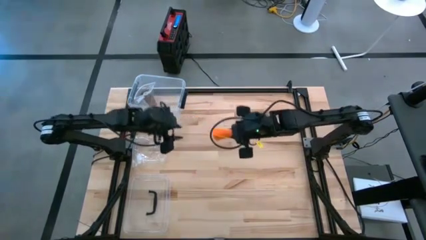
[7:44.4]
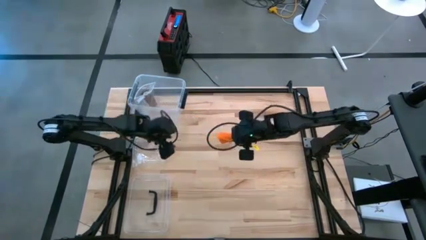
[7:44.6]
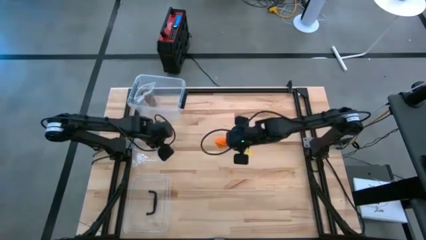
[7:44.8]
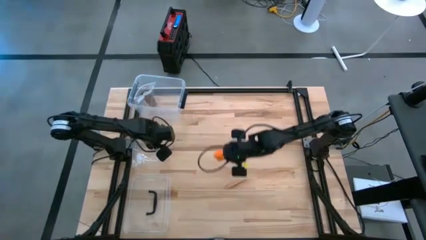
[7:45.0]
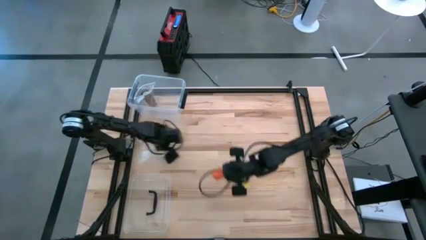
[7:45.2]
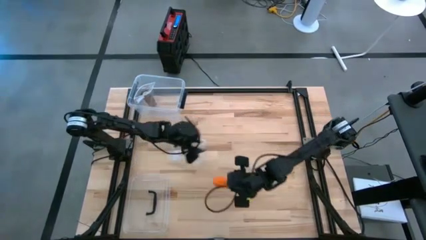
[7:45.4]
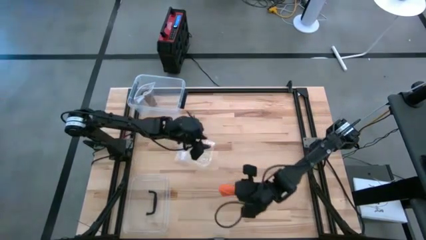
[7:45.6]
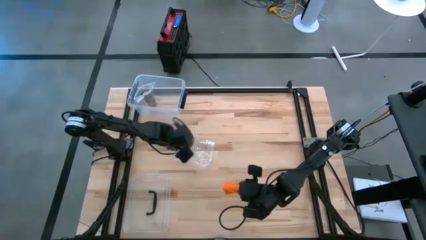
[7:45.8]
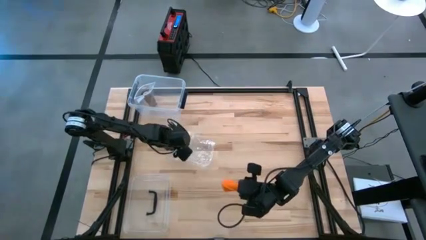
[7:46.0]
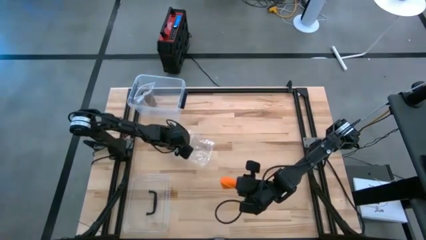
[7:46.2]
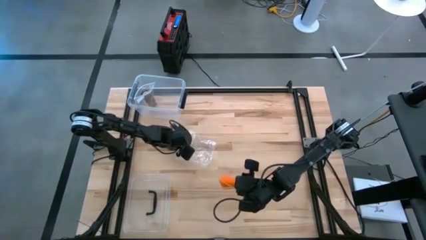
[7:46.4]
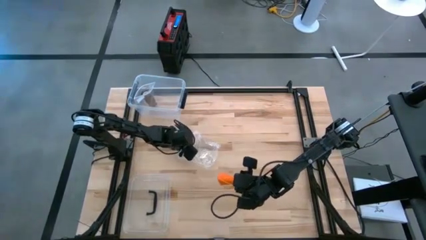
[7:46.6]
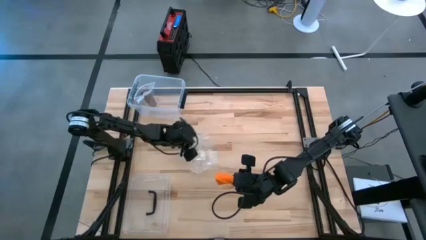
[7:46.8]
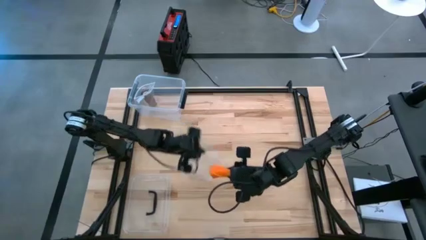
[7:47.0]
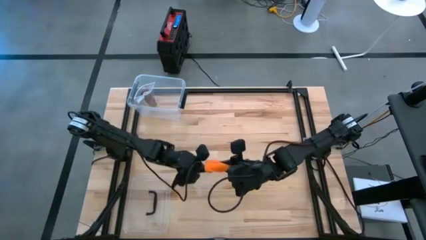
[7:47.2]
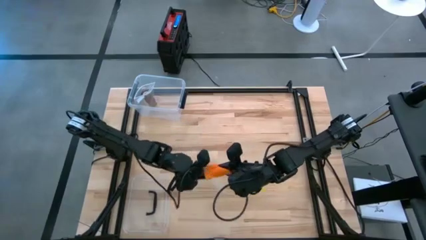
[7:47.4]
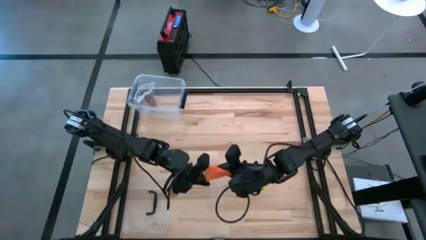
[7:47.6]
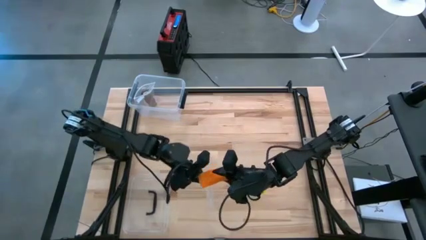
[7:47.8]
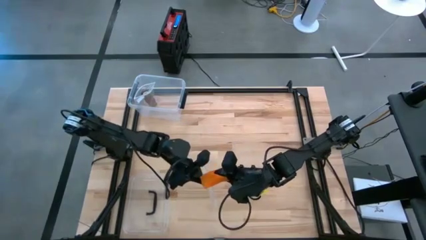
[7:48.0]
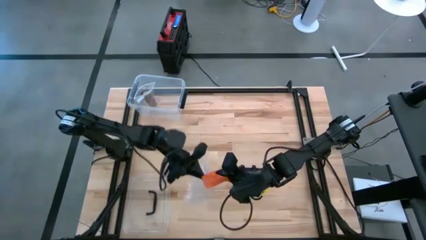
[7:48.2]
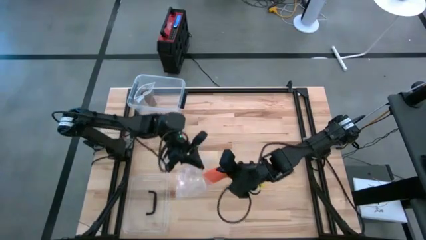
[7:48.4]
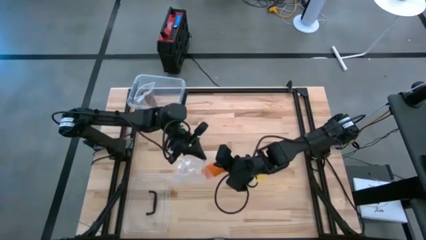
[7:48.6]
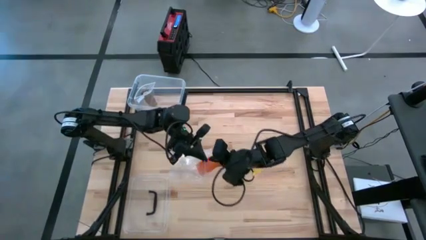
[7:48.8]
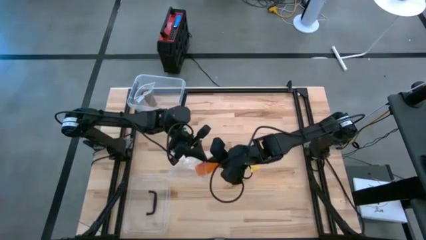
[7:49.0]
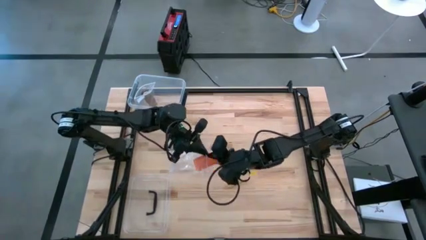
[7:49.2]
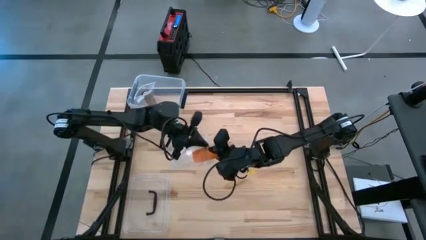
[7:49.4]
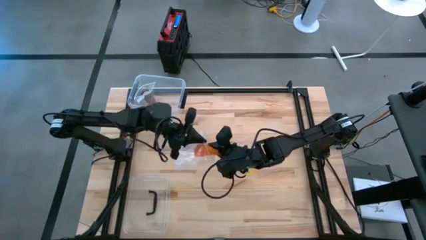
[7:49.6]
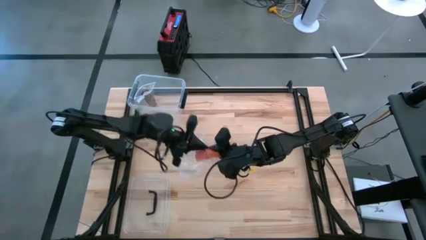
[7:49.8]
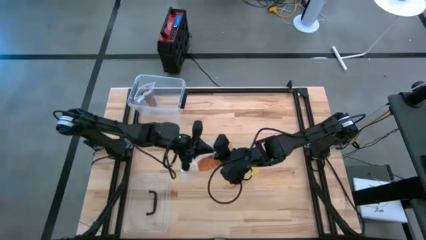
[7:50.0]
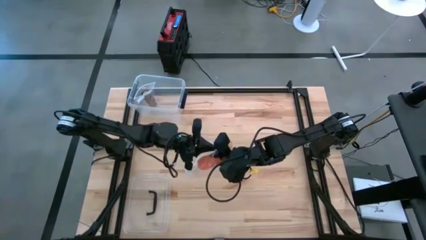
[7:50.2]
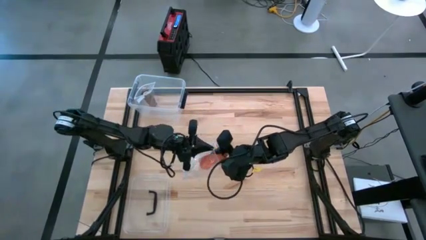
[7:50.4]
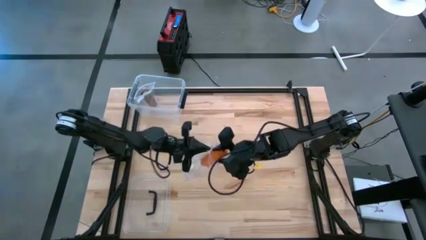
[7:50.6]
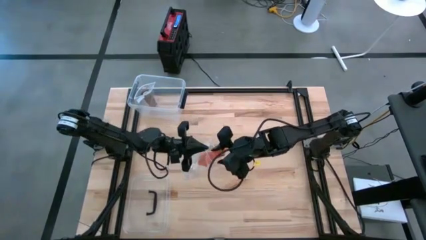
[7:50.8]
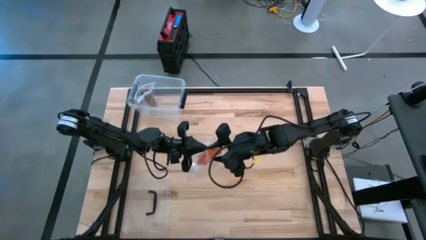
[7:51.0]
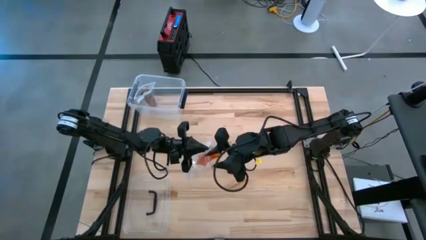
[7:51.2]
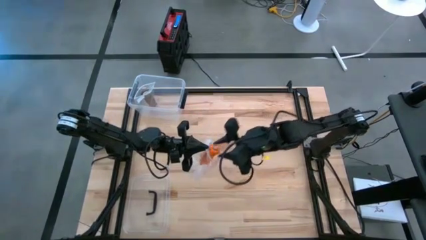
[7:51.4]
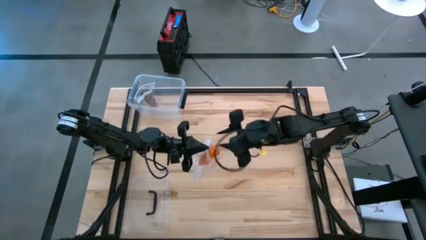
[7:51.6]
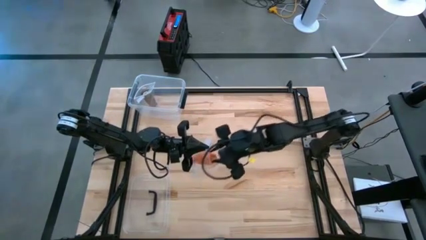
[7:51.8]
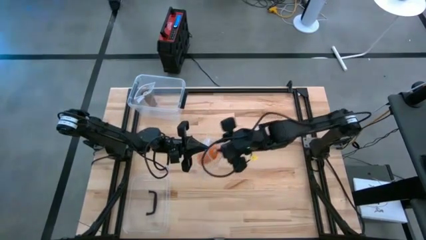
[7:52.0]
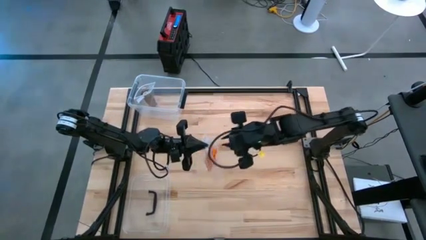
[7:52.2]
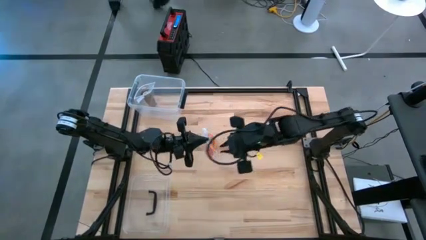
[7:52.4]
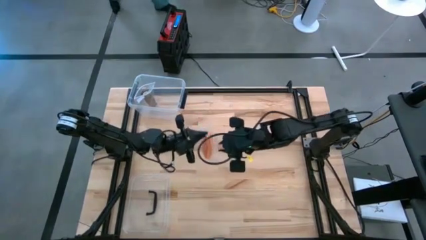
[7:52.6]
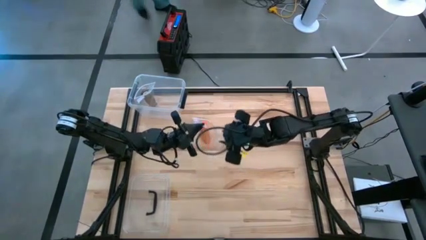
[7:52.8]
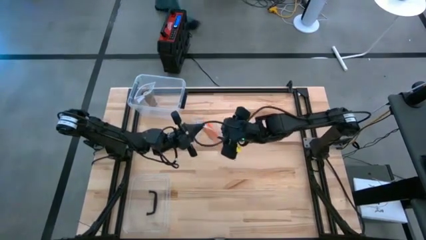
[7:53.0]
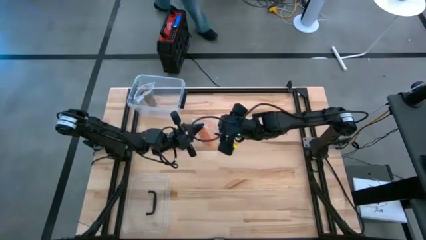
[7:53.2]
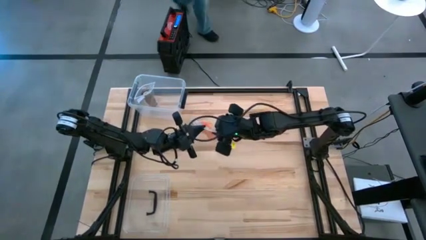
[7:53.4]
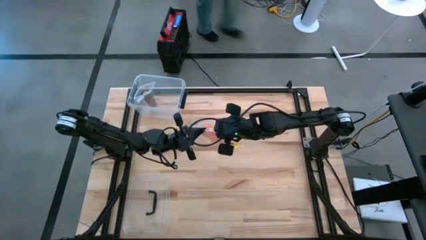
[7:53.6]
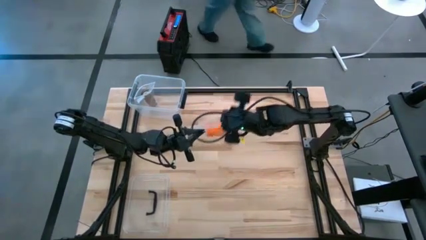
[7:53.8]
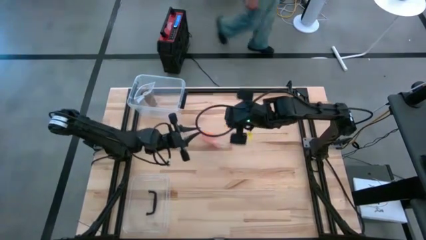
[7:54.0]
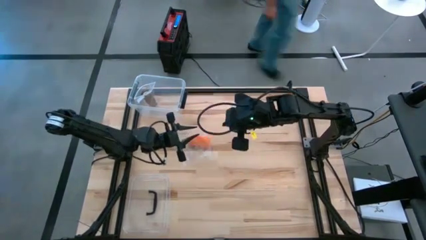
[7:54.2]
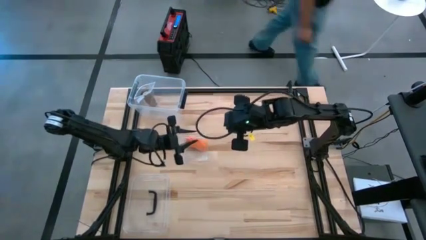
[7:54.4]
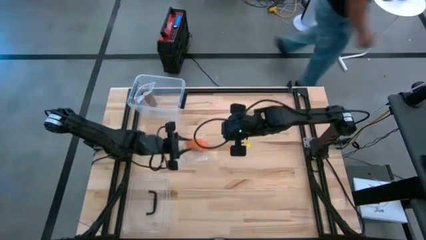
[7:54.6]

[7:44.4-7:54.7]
Task: Roll bandage
Put the rolled orange bandage into the zip bag

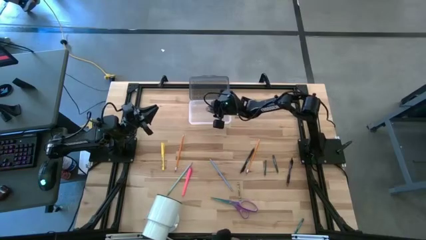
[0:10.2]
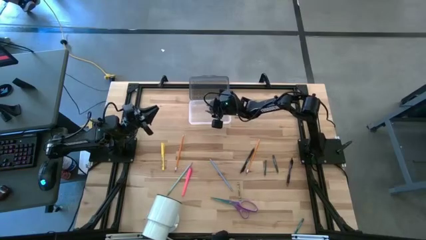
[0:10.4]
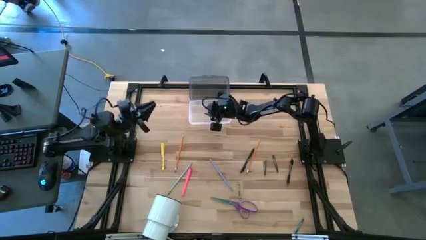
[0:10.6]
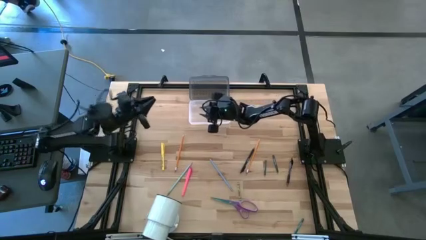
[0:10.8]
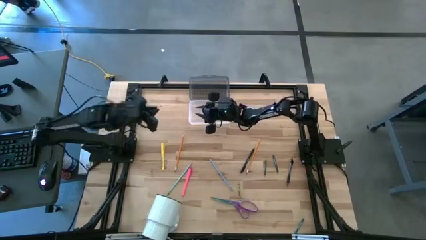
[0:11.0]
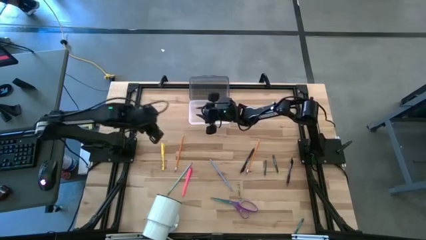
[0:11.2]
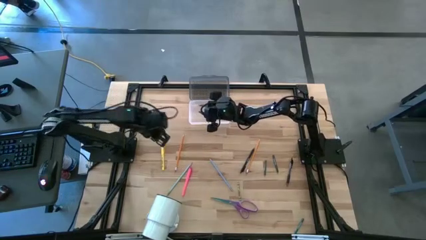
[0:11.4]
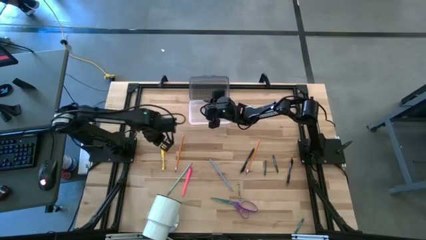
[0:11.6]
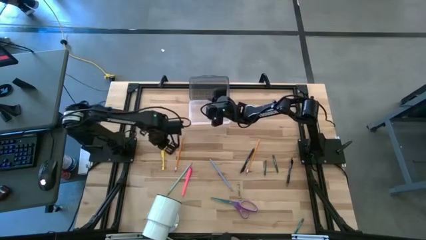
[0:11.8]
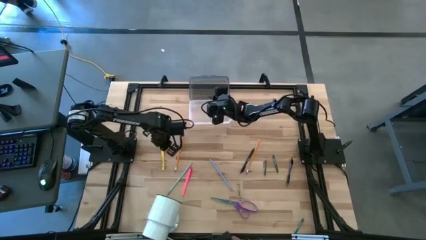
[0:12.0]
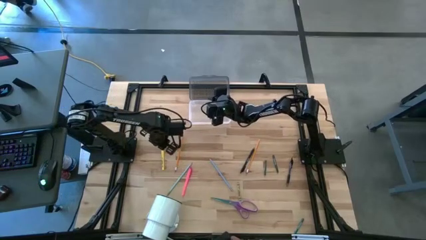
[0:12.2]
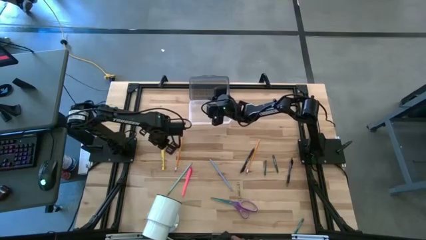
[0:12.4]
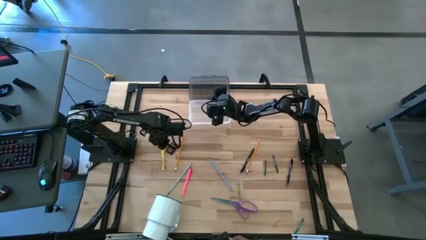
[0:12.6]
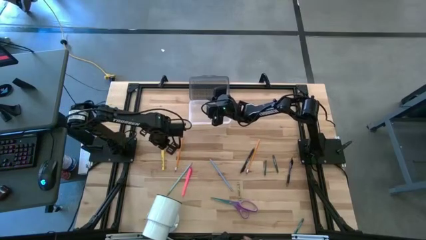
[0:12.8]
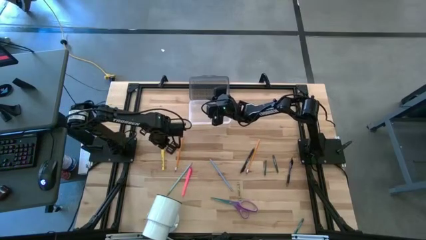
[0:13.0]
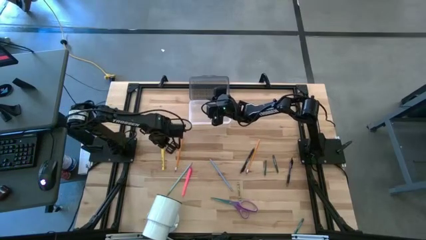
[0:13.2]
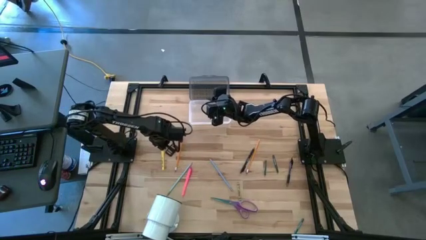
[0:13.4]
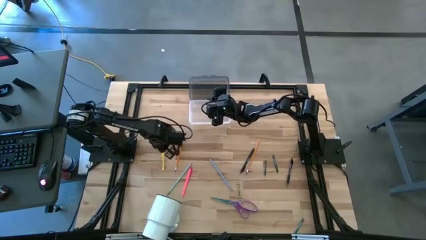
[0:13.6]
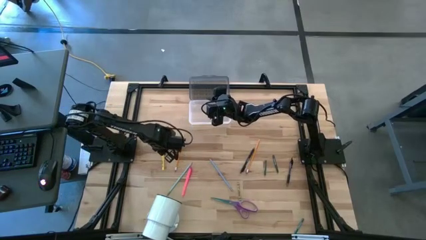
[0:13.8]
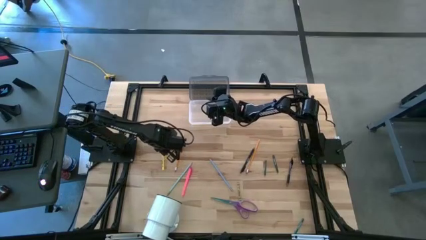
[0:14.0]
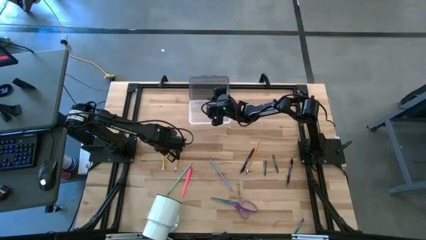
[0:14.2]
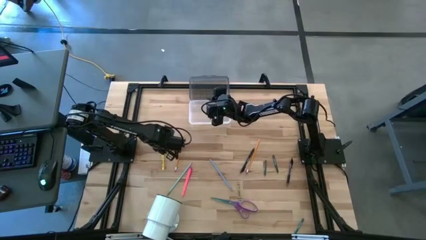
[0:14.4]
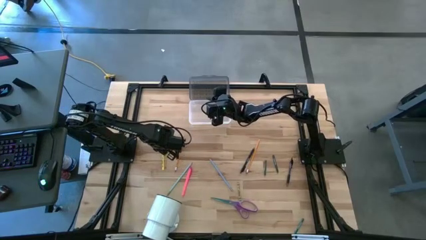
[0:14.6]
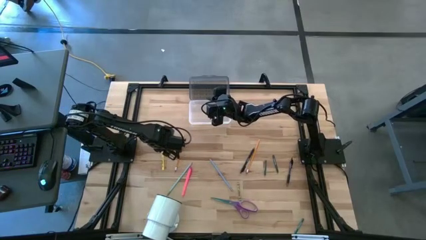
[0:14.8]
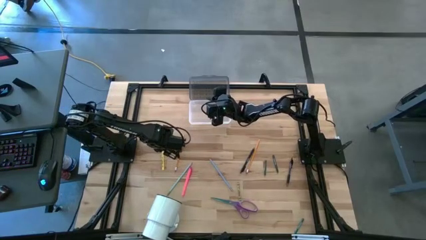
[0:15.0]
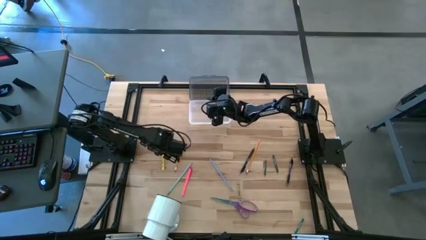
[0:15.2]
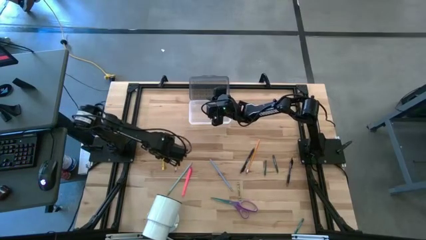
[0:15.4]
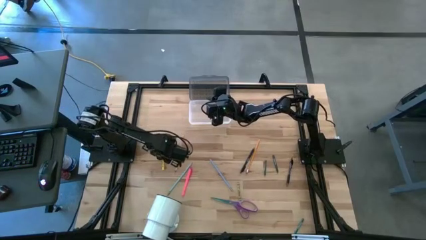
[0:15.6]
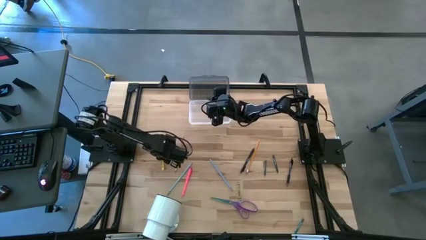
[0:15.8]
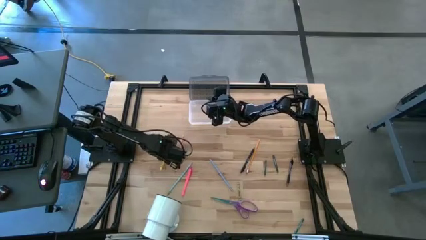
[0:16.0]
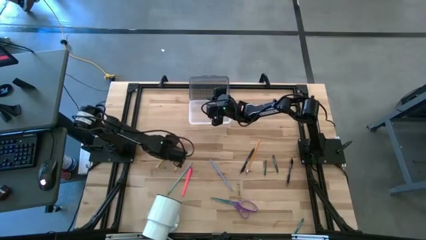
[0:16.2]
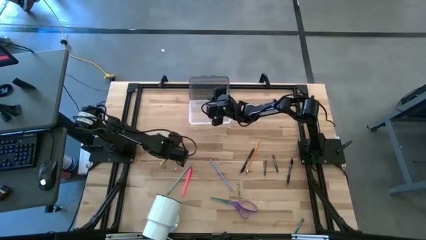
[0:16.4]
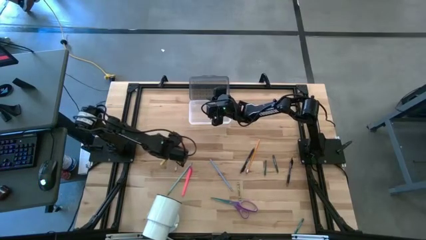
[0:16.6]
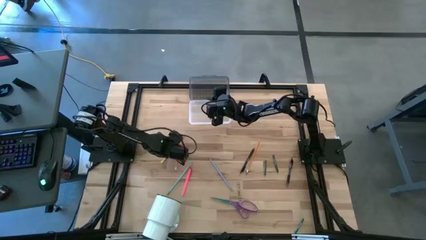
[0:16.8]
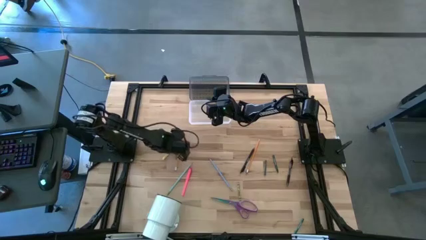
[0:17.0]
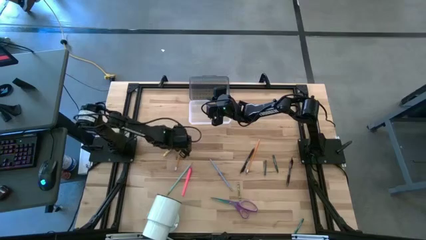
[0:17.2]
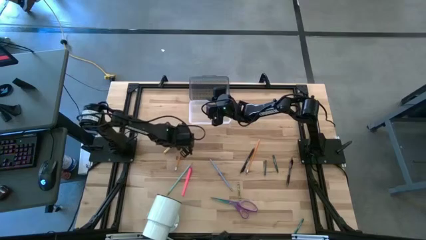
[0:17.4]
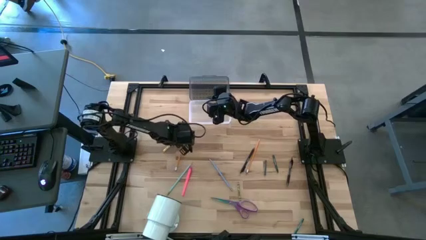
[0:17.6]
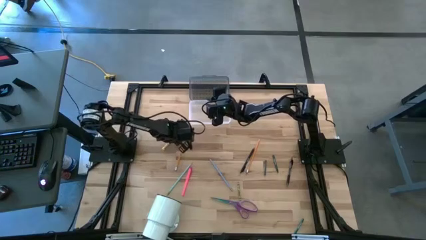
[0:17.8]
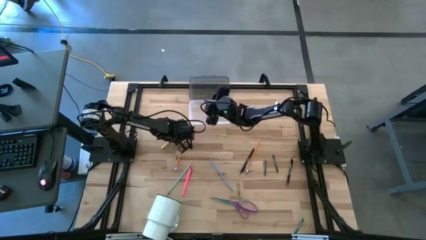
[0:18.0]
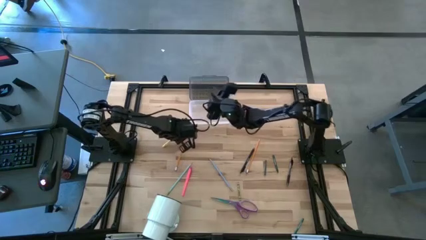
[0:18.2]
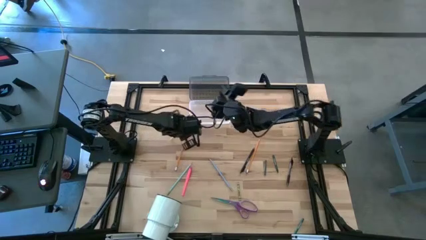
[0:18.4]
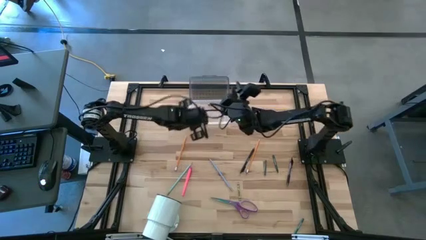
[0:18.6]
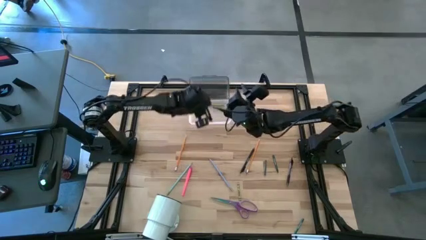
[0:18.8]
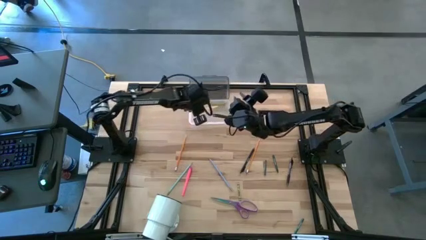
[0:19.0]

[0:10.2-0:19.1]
Task: Pick & place school supplies into a supply box
Put the yellow pen into the supply box
